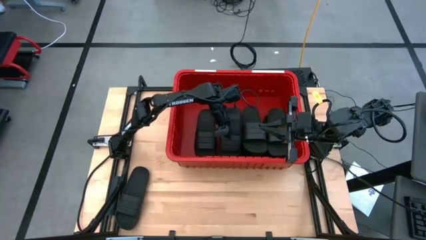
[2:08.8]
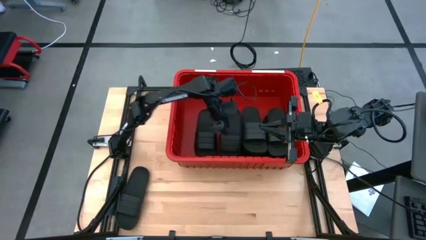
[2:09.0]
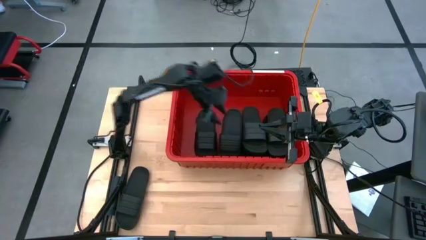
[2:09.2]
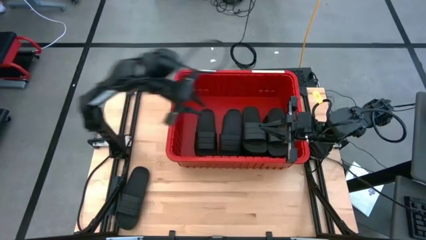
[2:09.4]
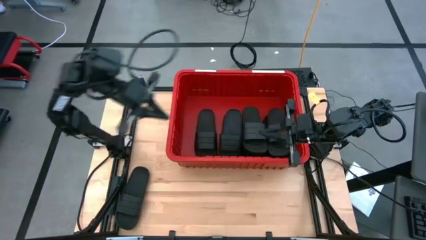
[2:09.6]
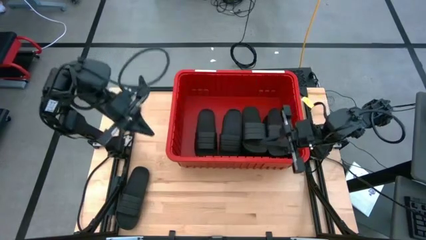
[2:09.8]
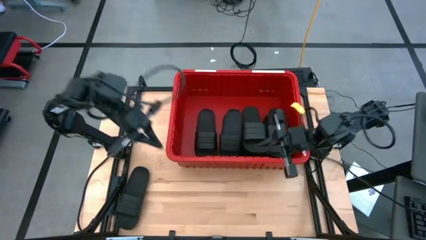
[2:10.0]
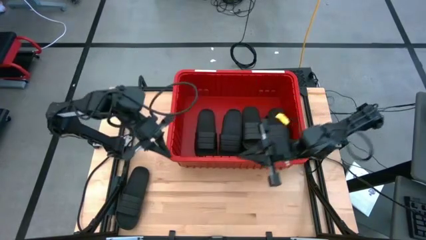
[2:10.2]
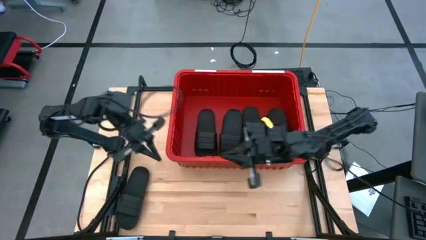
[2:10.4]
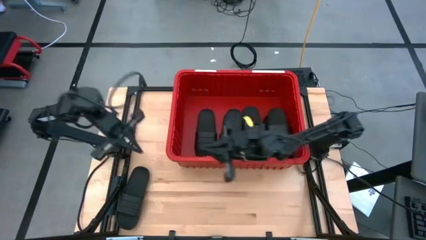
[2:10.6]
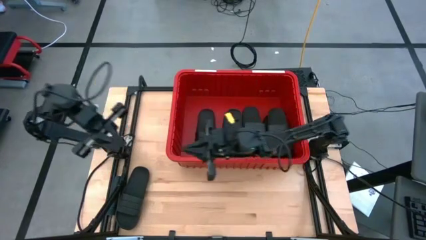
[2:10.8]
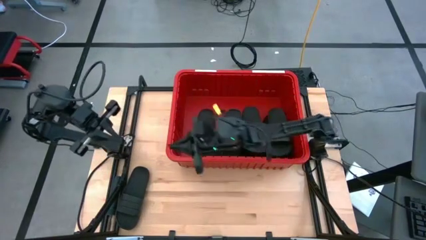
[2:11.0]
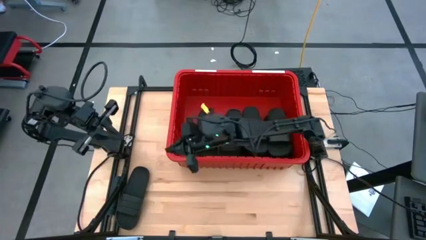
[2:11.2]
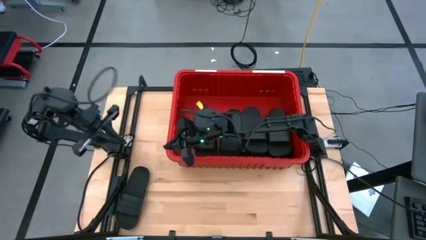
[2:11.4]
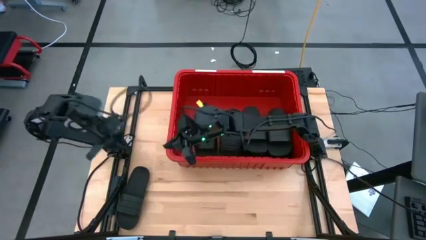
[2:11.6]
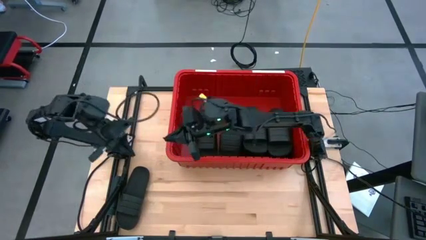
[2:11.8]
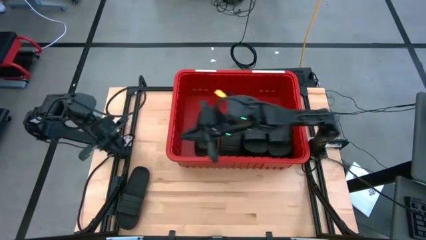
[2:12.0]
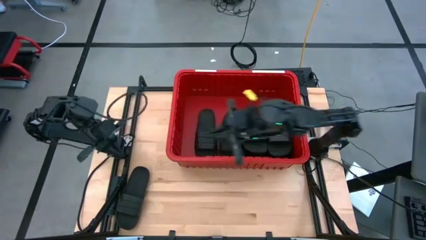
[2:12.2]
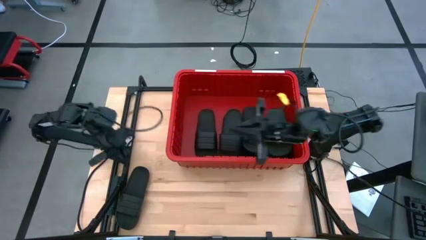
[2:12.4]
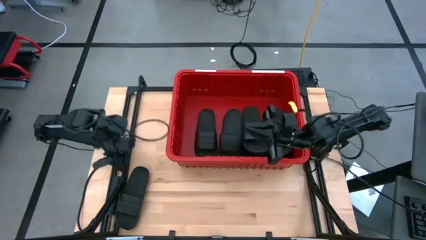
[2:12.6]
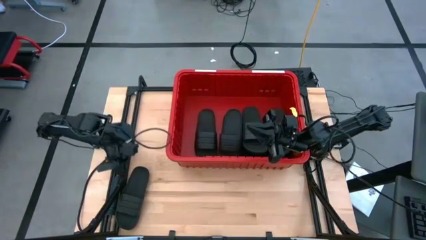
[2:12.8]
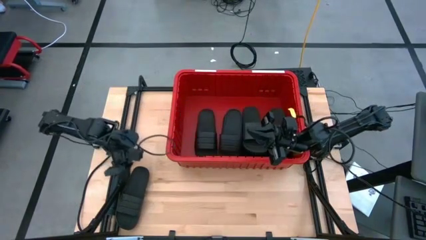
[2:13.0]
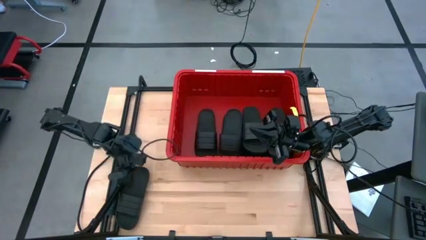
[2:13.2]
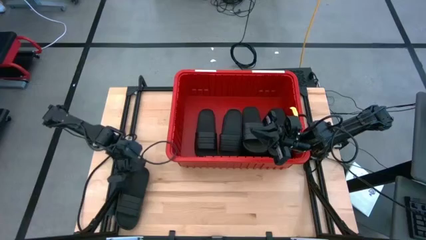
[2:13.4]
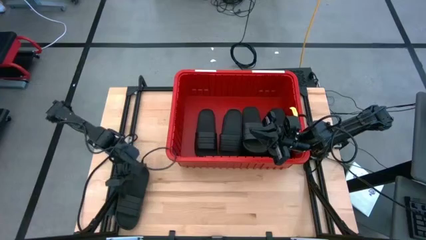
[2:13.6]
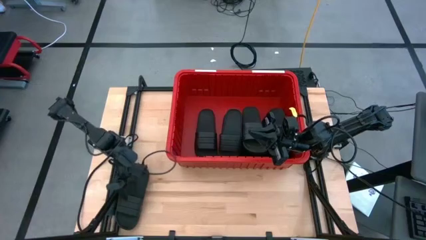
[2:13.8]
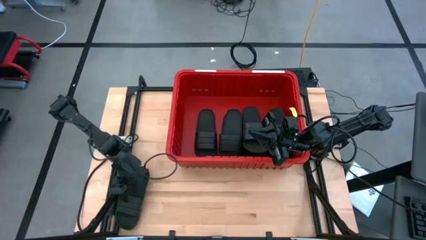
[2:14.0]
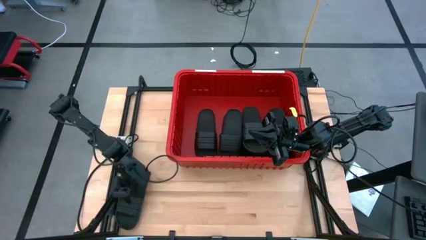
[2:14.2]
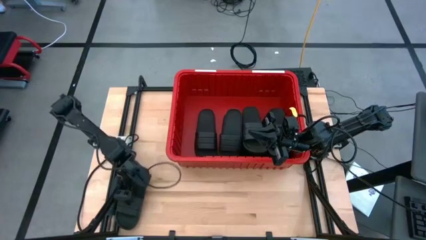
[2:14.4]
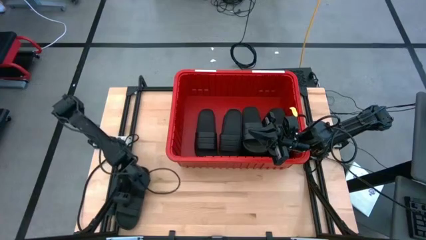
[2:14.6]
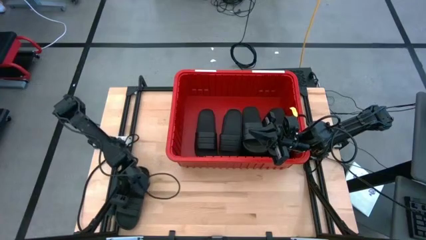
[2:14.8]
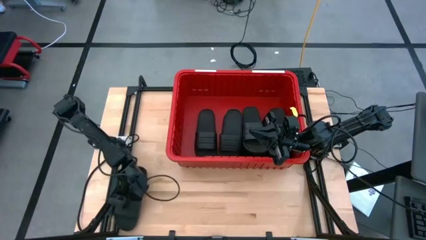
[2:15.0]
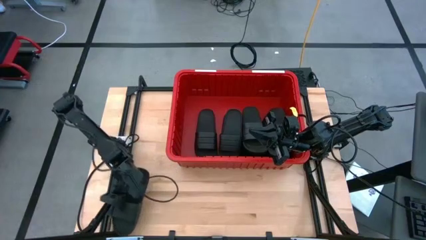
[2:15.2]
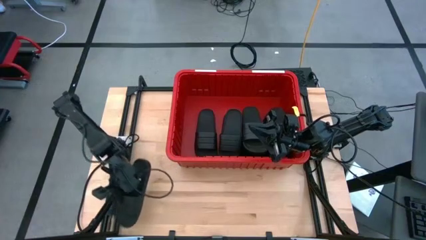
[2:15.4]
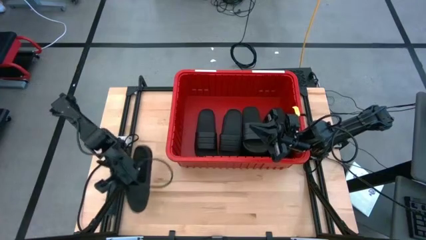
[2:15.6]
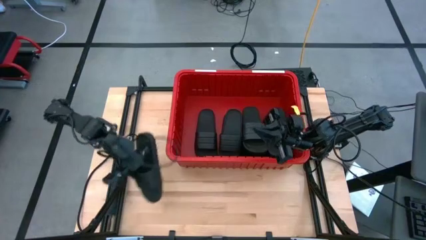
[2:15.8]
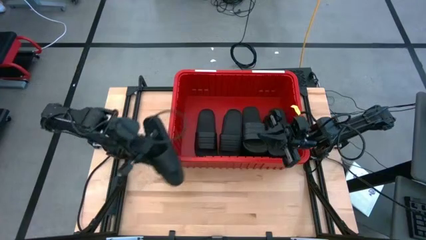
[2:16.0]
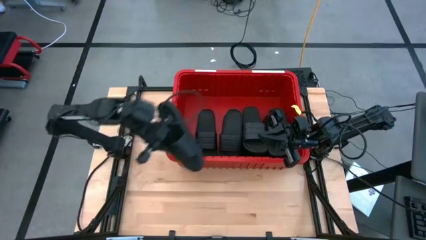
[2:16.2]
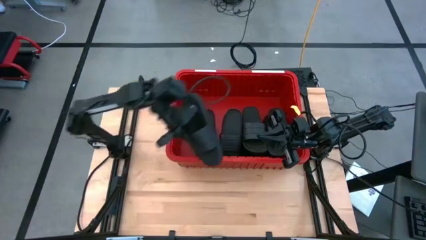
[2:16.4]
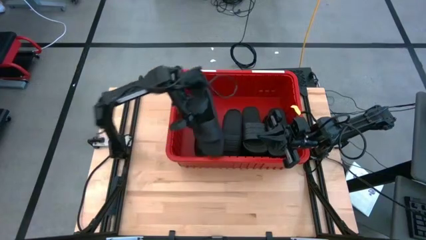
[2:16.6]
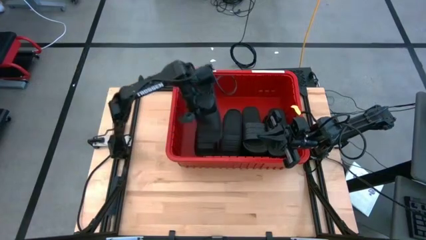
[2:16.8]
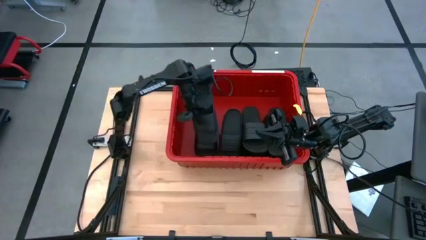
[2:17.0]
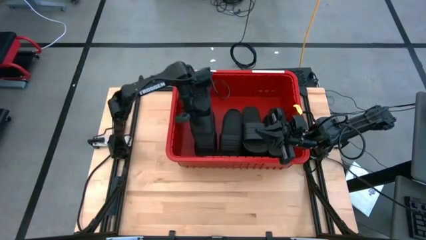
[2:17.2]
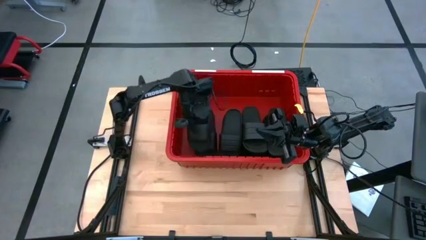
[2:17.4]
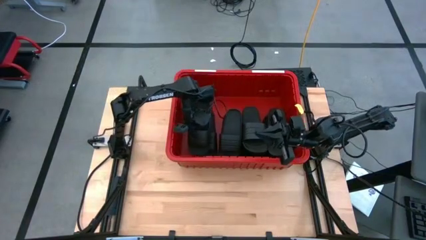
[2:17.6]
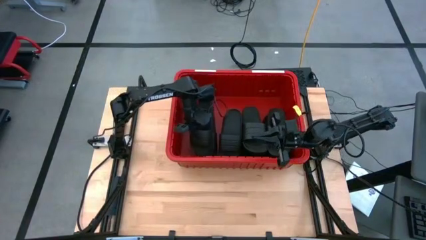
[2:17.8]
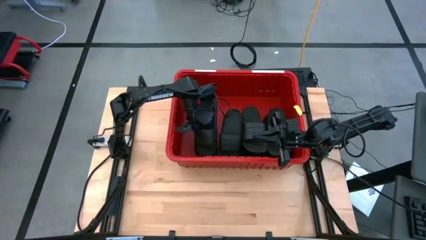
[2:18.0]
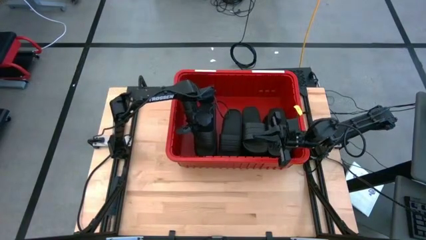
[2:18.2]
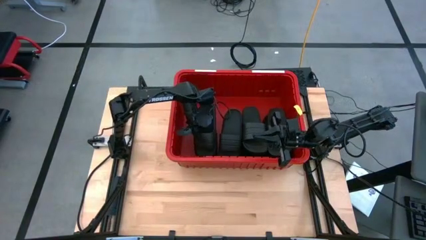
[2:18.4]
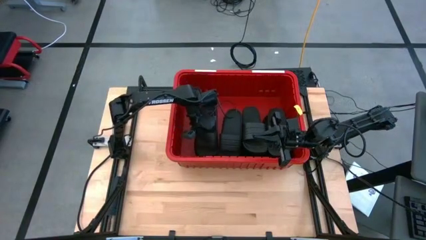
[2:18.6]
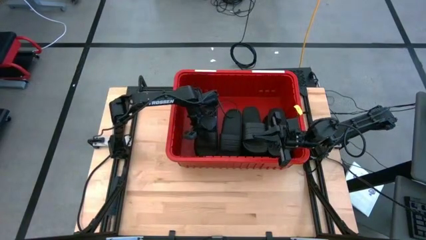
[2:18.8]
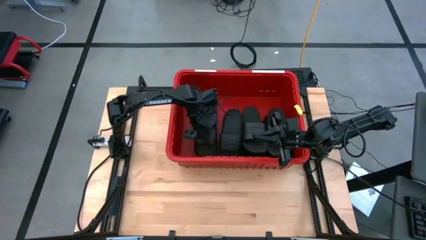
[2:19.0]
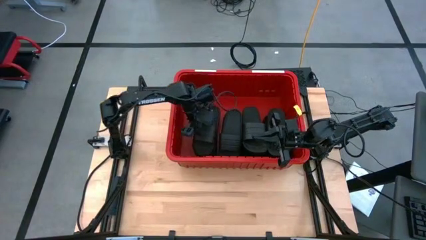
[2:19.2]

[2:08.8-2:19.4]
Task: Pick and place slides into bin
Put the black slide into the red bin

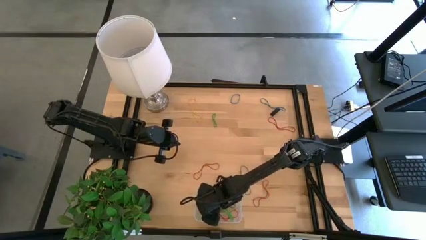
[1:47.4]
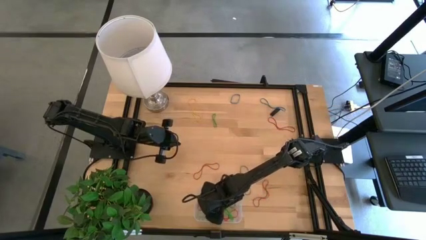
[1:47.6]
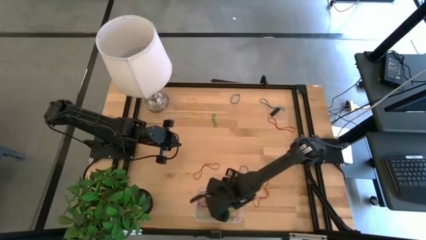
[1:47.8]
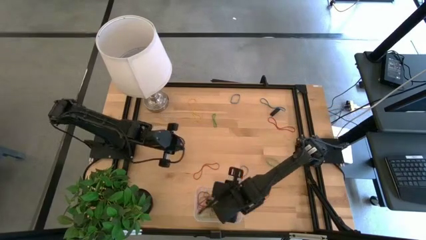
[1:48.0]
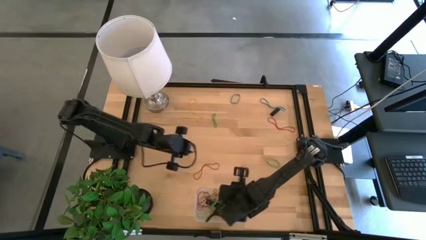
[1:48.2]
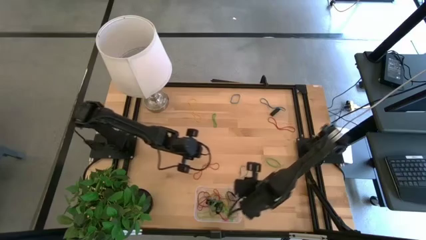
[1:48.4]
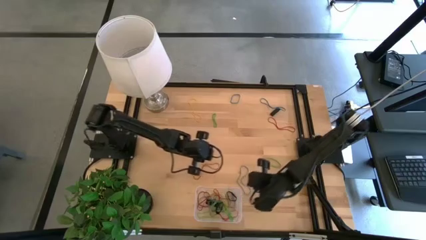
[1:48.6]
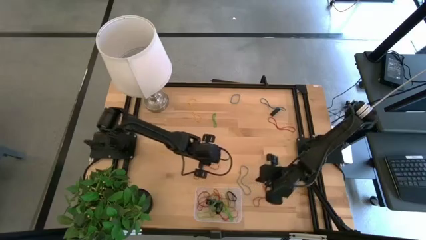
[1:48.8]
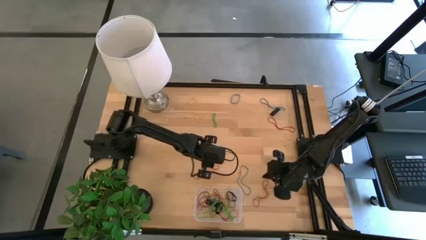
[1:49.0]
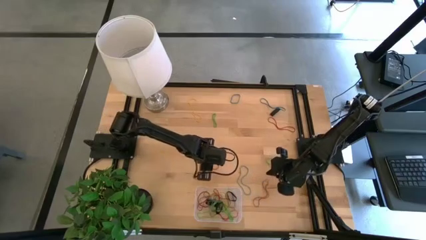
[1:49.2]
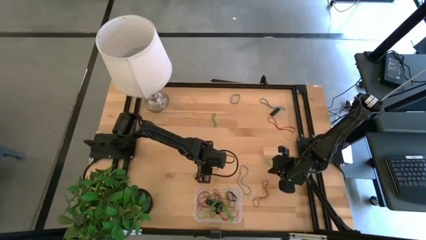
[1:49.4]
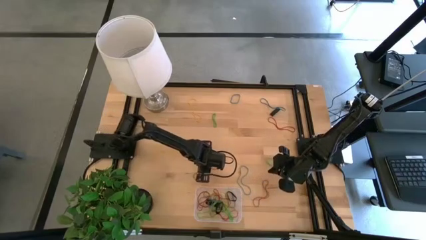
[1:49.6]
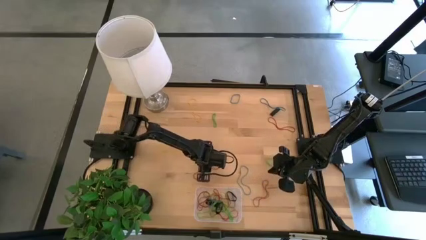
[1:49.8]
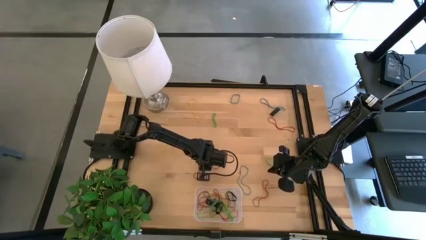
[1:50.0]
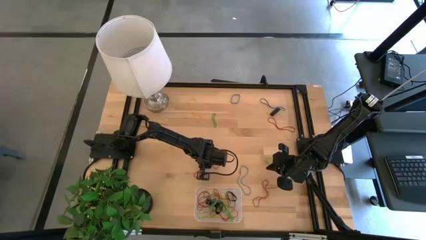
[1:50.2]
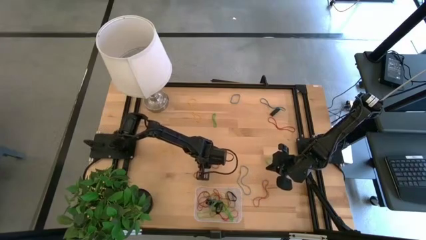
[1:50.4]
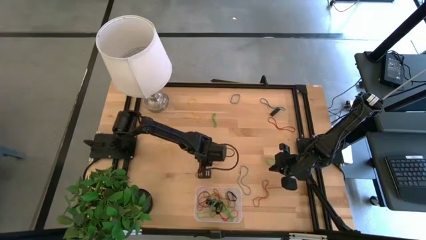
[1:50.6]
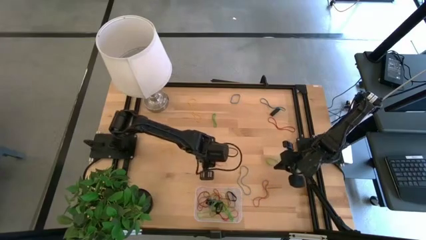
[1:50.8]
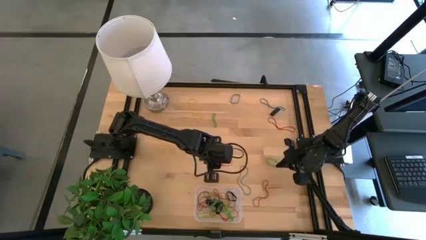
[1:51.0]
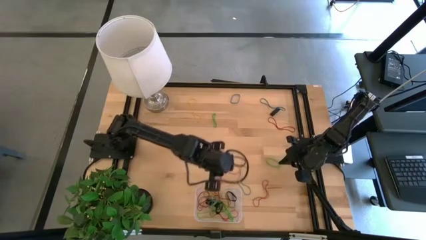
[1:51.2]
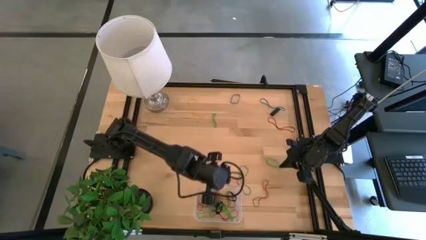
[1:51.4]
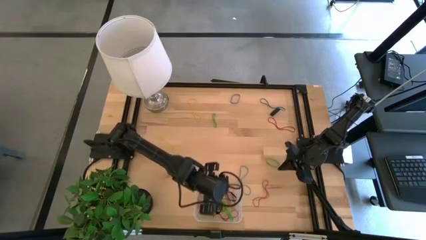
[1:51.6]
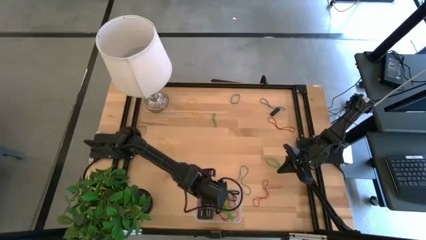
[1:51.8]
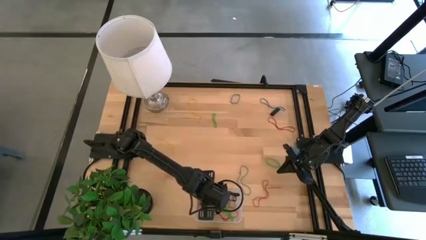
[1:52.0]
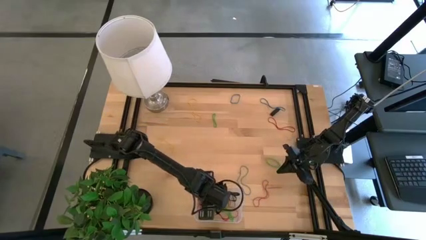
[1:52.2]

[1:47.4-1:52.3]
Task: Pick and place rubber bands into bin
Put the red rubber band into the transparent bin

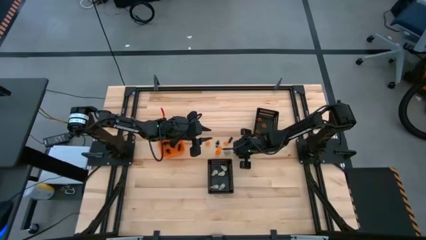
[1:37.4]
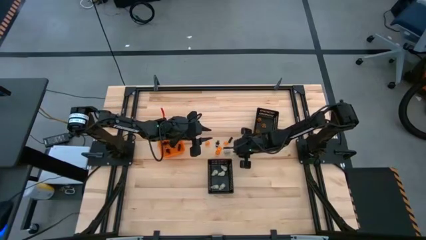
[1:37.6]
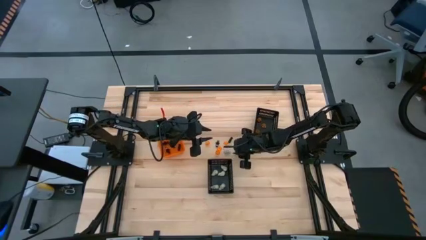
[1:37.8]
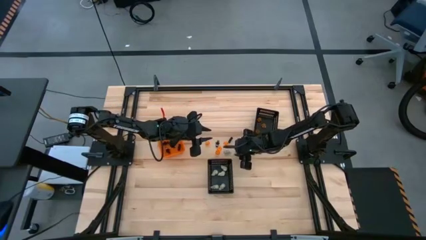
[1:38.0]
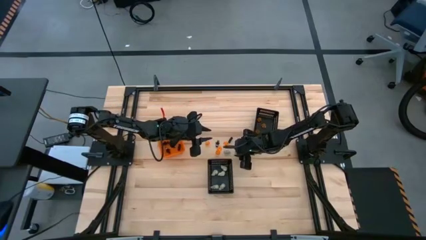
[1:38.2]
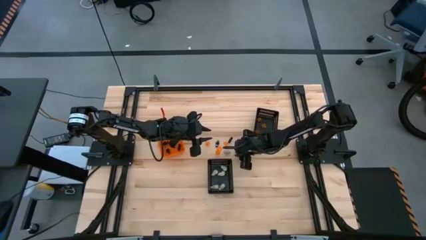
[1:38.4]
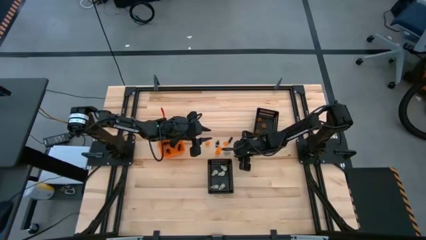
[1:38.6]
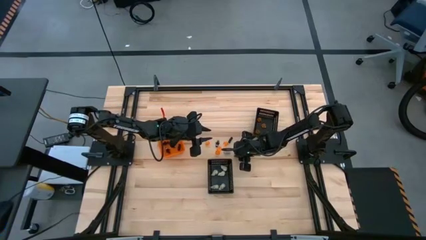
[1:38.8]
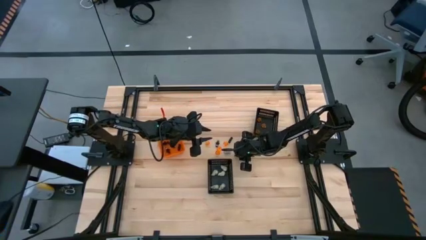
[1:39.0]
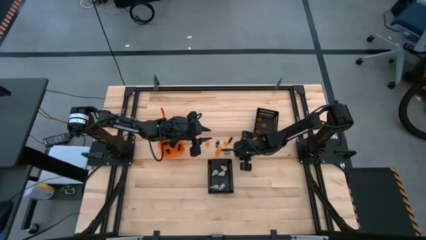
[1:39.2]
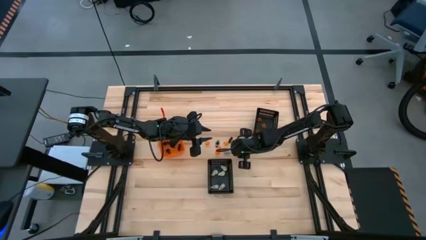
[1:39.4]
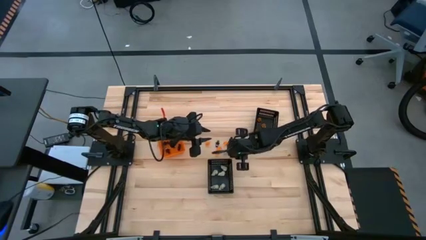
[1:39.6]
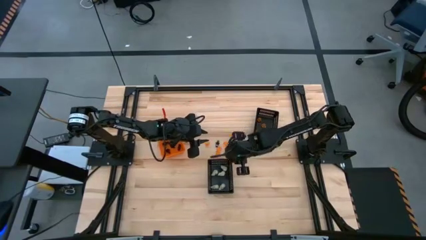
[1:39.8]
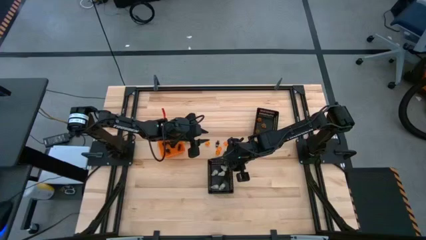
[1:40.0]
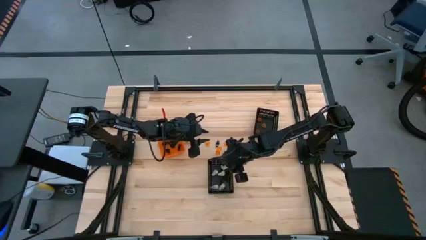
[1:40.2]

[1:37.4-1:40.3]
Task: Sort Halloween decoration
Put the white skull toy into the bottom black bin
